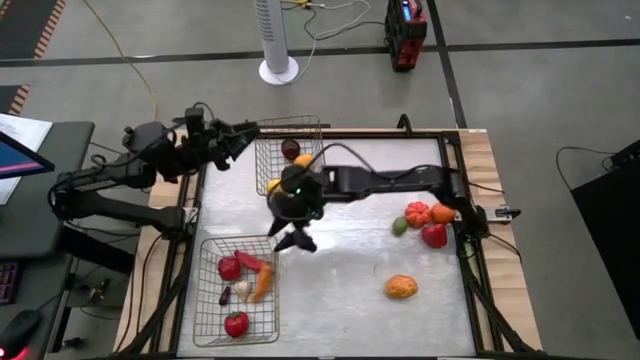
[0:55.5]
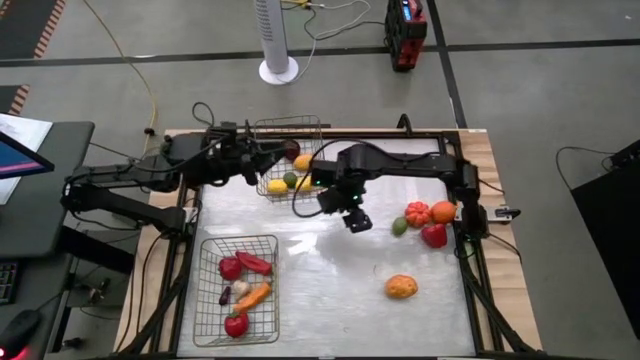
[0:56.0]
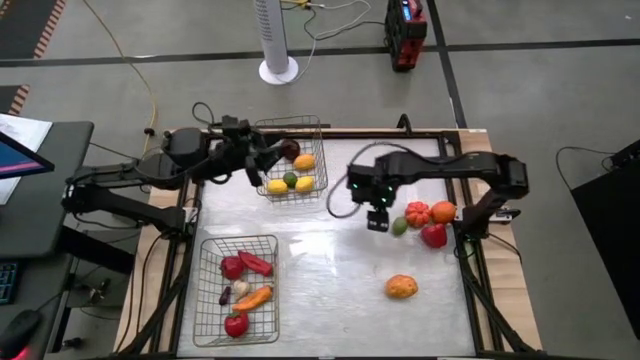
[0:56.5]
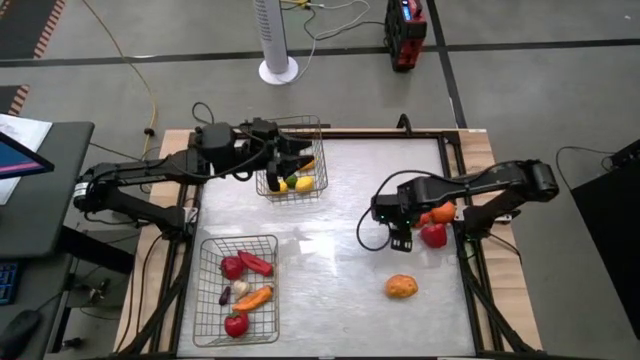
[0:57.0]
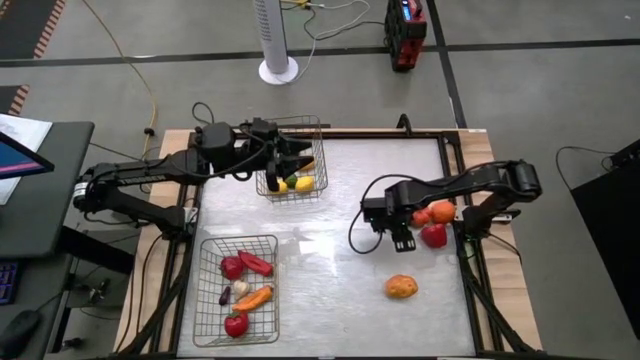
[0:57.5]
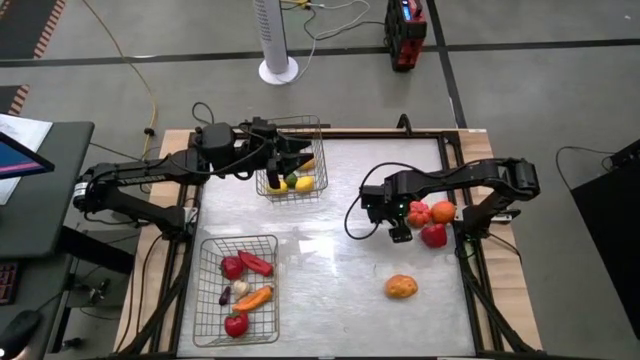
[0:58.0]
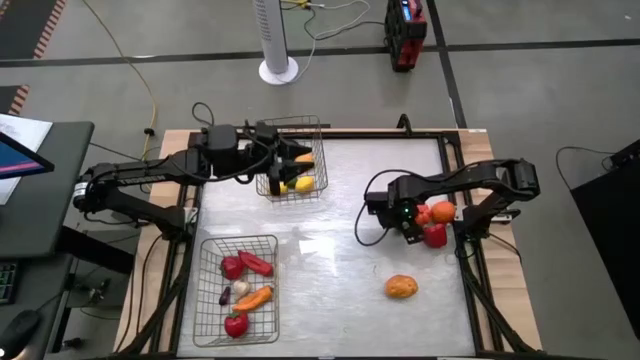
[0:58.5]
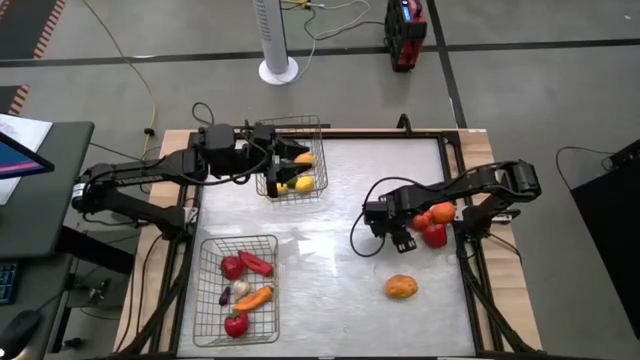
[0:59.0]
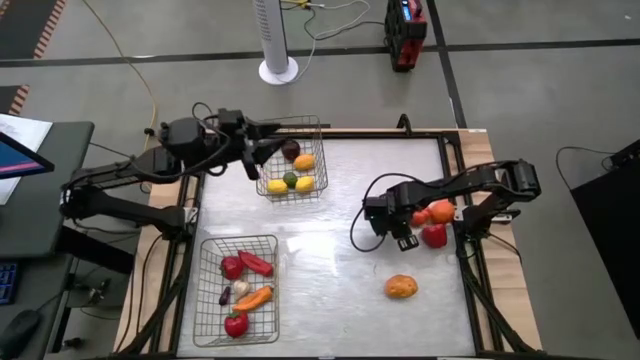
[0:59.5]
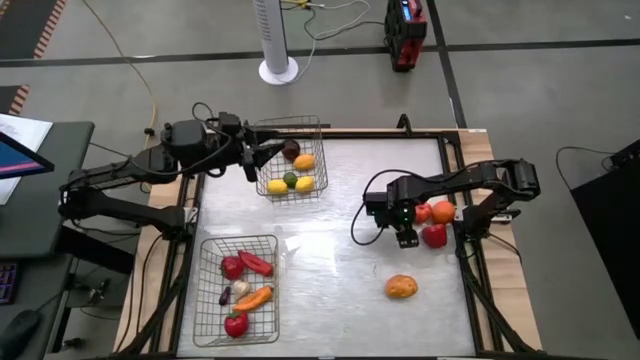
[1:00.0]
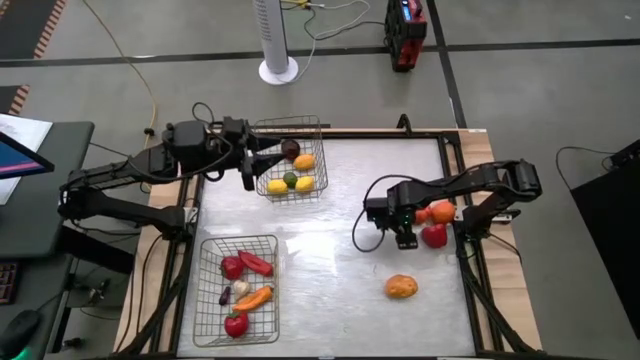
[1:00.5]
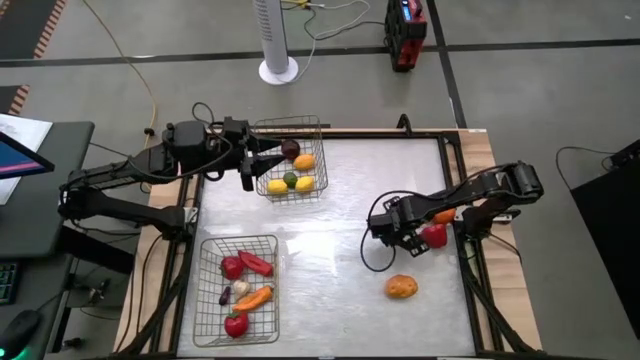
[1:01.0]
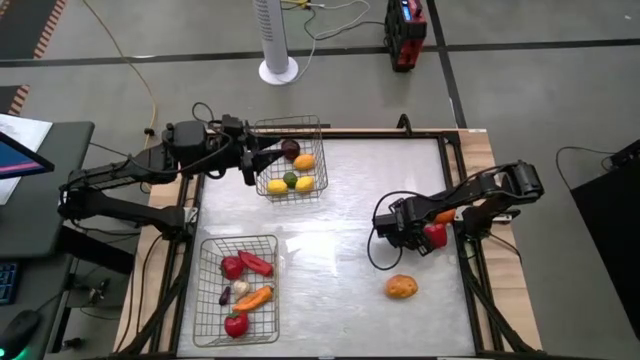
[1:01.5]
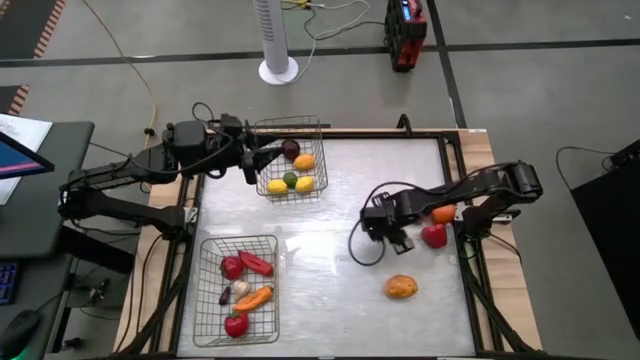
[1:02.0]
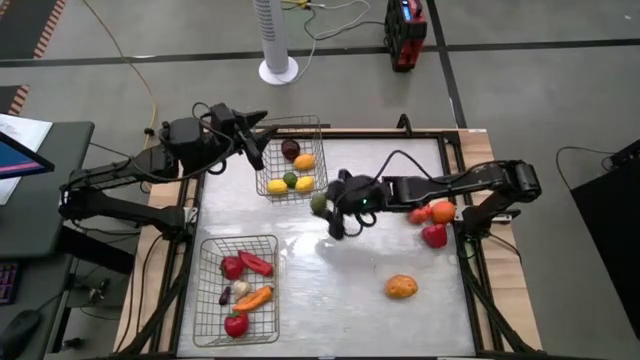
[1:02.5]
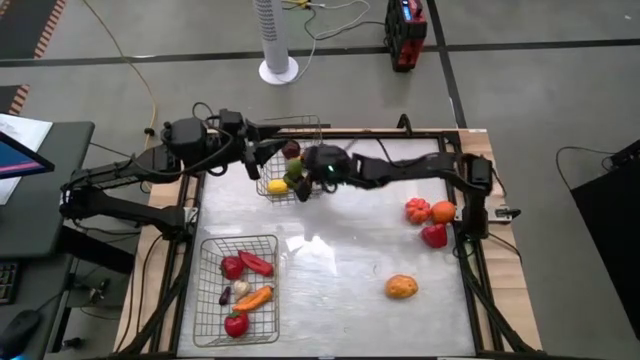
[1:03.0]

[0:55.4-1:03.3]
Task: Sort produce into baskets
Put the green lemon into the top wire basket

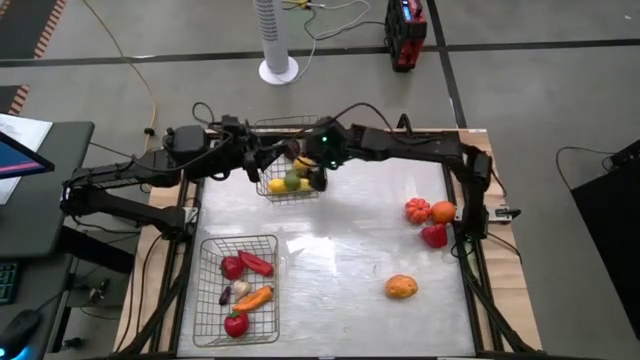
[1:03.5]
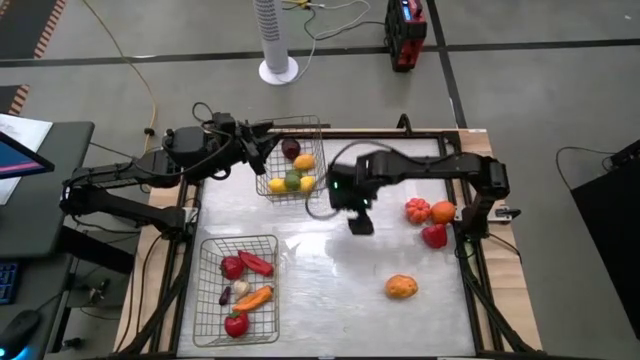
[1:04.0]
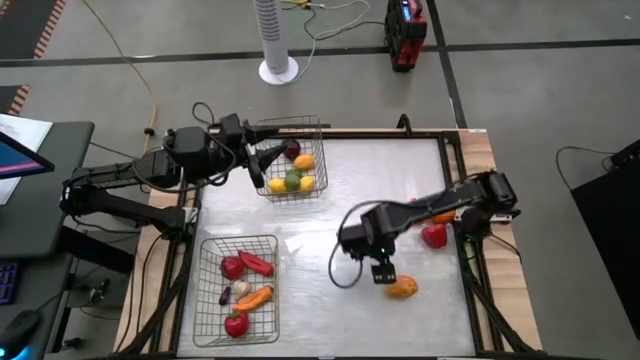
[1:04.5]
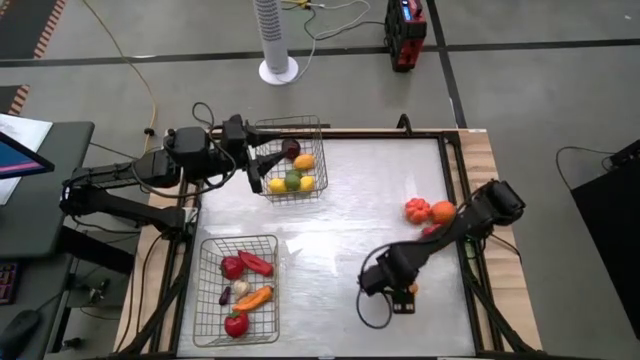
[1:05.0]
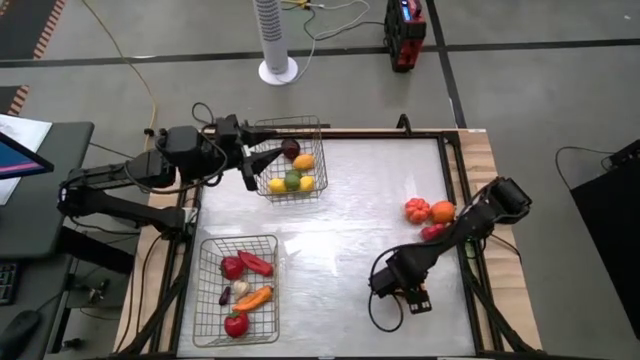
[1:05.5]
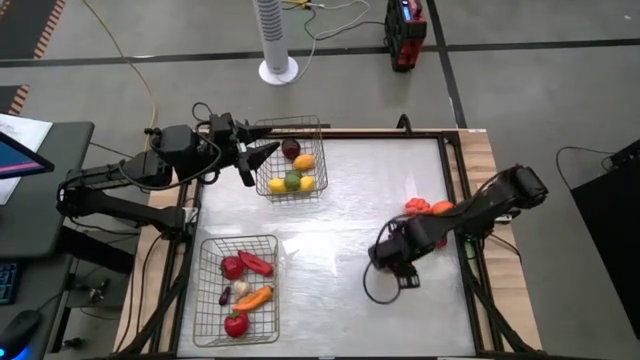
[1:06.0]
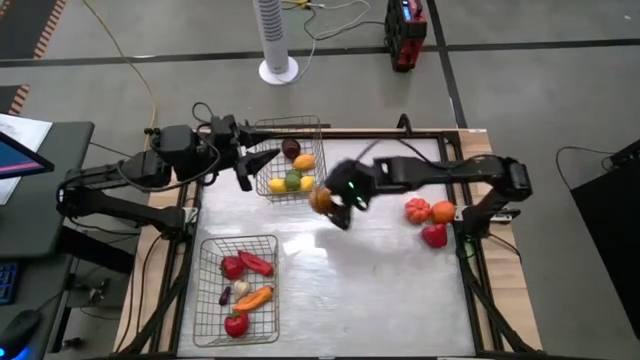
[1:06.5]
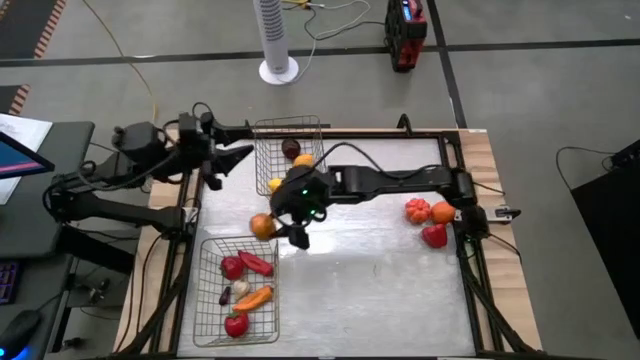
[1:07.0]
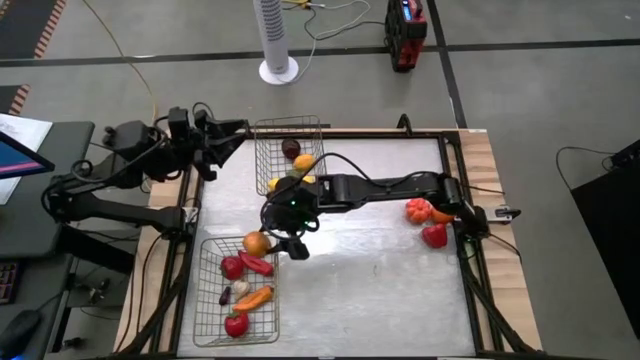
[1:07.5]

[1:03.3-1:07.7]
Put the potato into the bottom wire basket

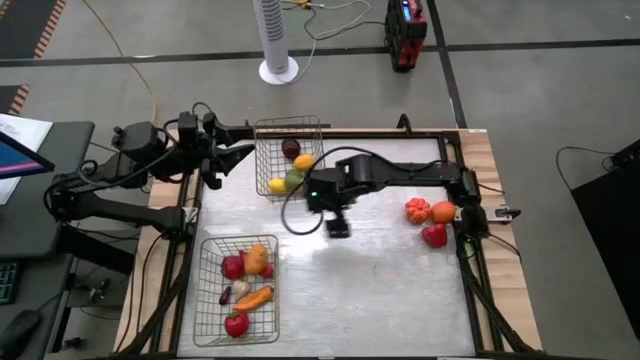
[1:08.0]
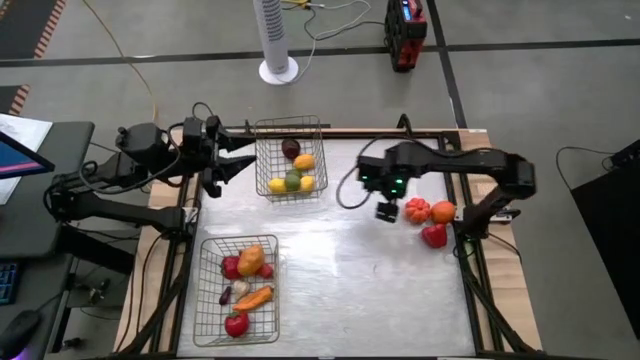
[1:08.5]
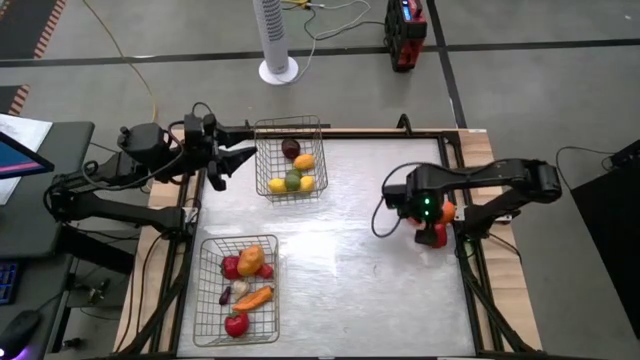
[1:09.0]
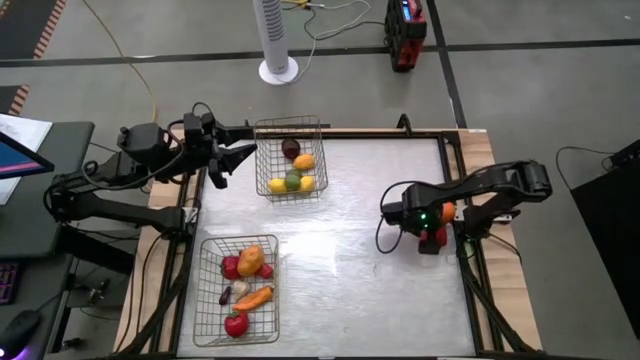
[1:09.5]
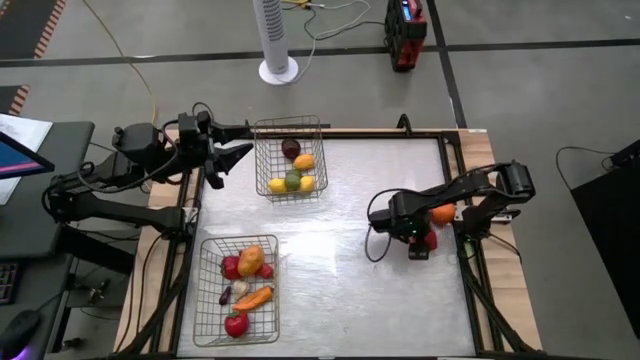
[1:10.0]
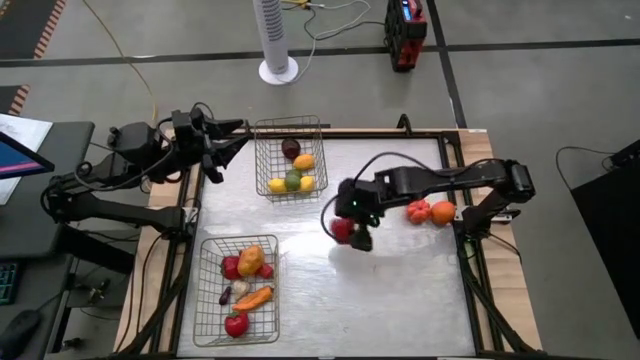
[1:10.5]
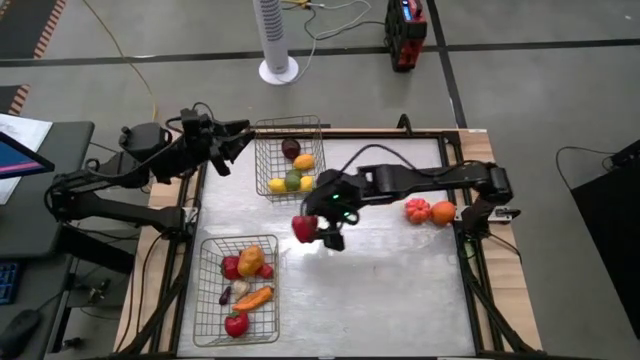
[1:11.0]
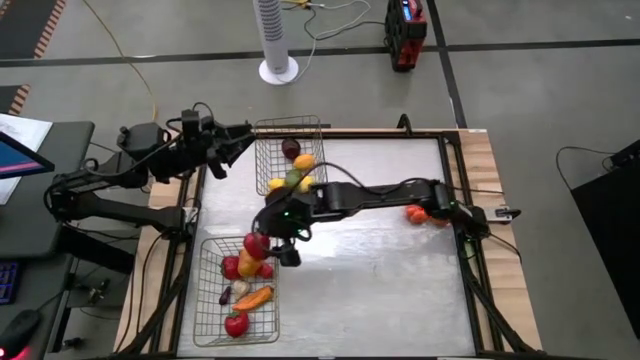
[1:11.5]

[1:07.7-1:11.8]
Put the red bell pepper into the bottom wire basket

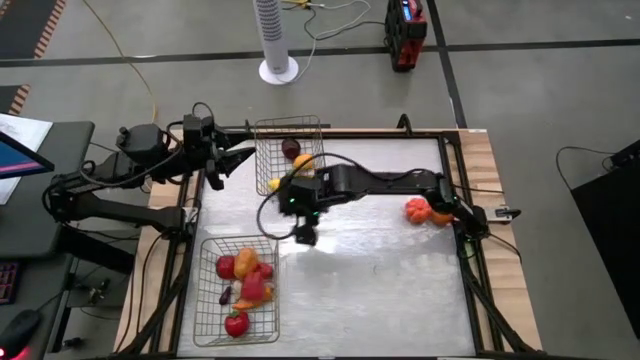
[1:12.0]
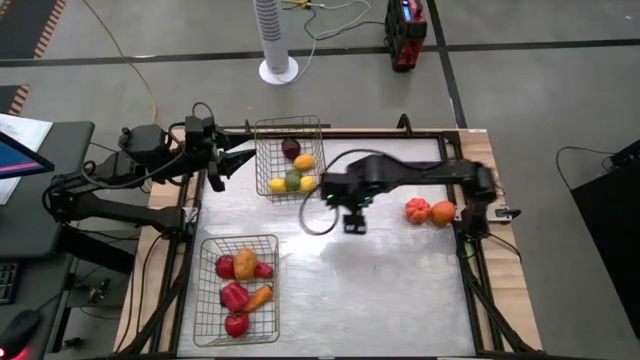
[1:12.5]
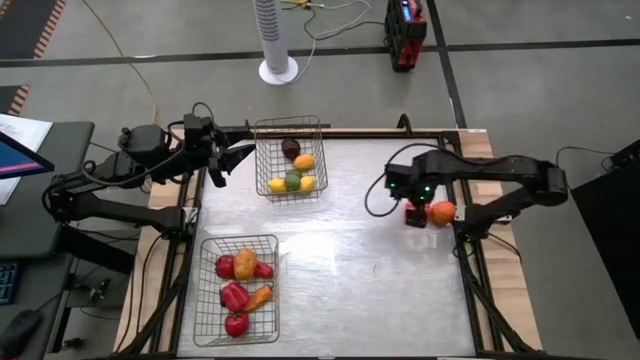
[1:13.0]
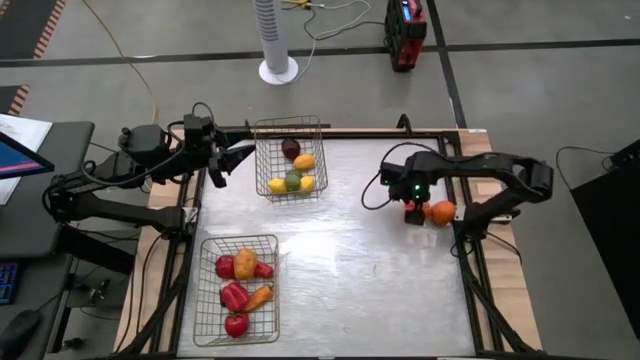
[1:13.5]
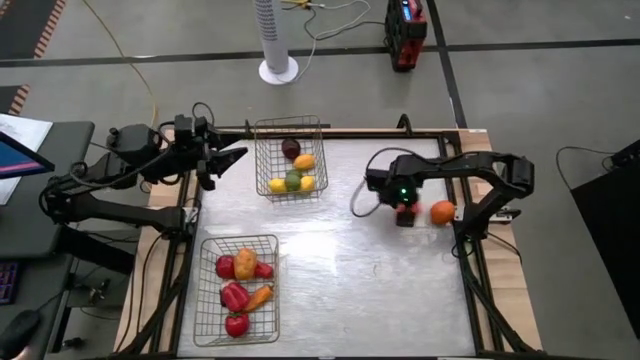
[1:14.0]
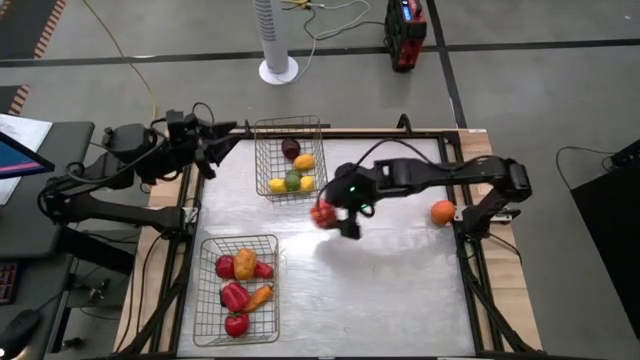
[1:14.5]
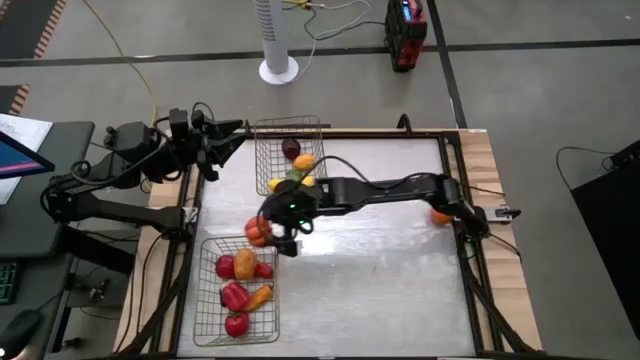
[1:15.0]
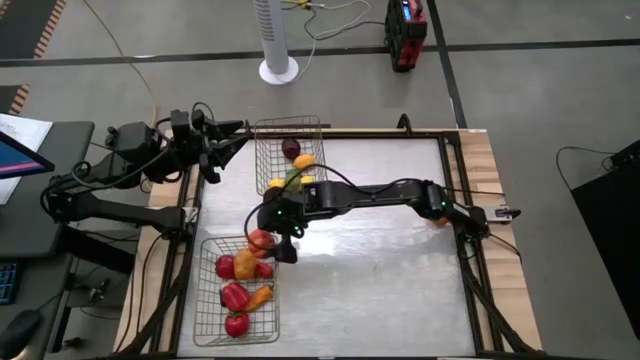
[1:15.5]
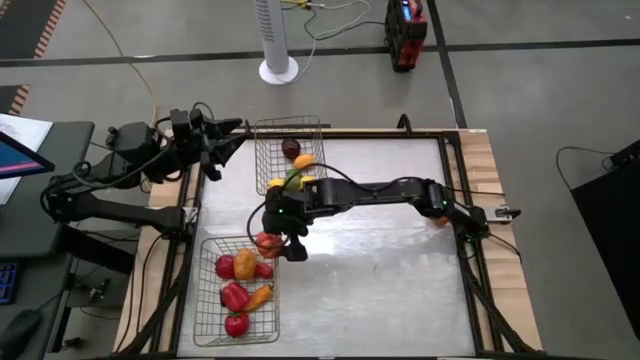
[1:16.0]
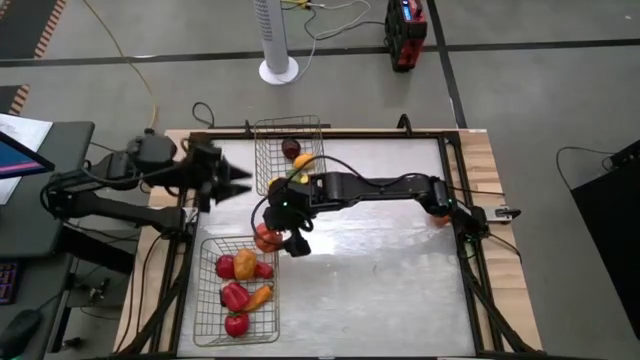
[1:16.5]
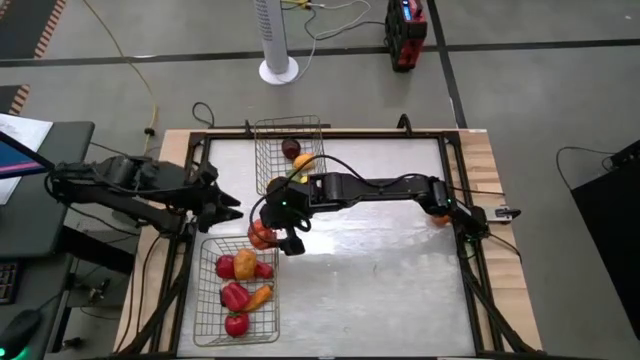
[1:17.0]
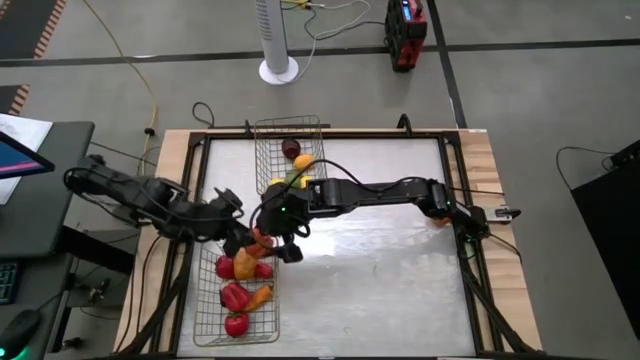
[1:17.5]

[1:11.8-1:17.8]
Put the orange bell pepper into the bottom wire basket
